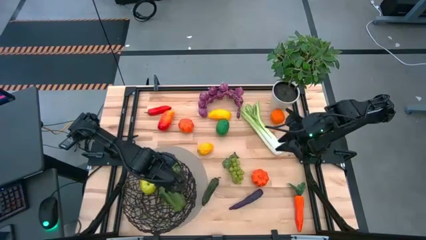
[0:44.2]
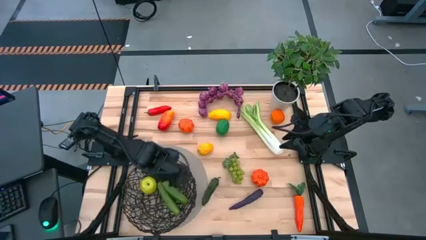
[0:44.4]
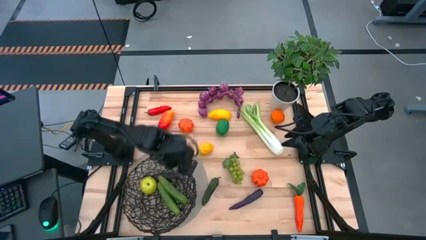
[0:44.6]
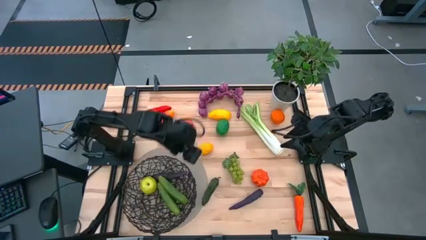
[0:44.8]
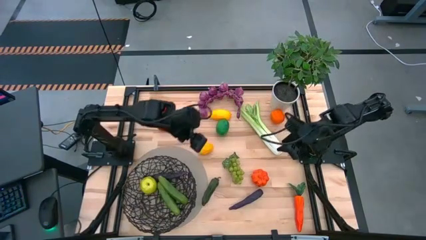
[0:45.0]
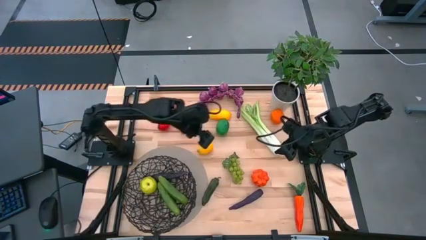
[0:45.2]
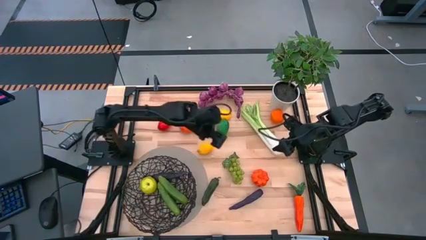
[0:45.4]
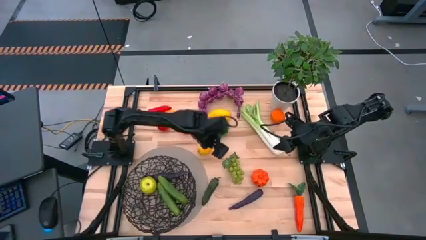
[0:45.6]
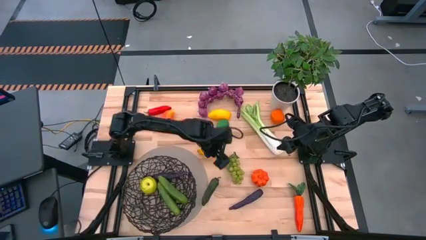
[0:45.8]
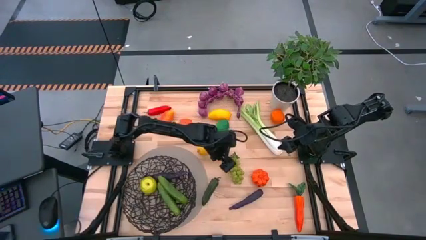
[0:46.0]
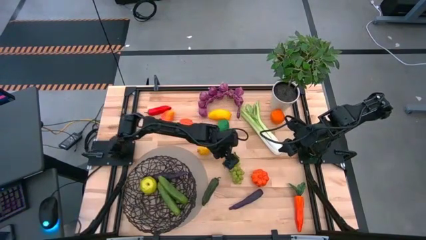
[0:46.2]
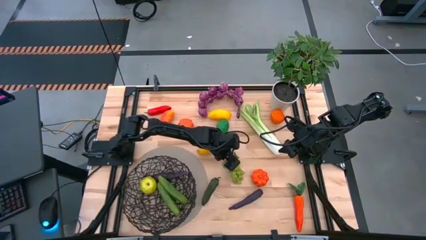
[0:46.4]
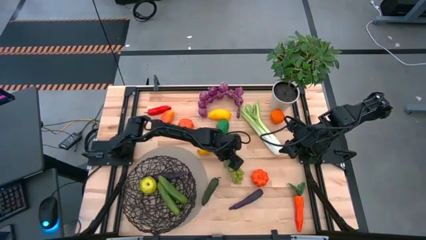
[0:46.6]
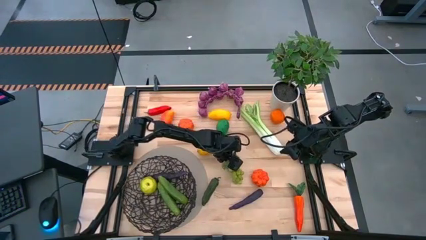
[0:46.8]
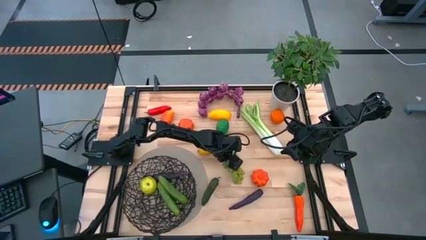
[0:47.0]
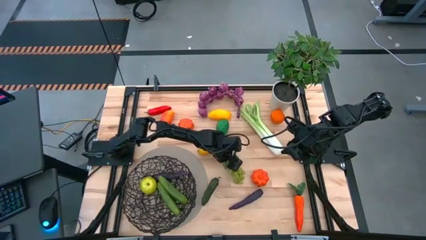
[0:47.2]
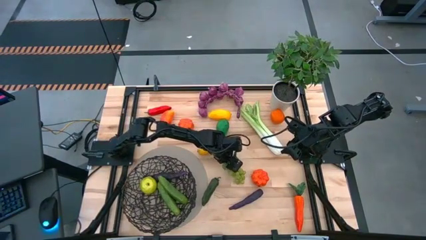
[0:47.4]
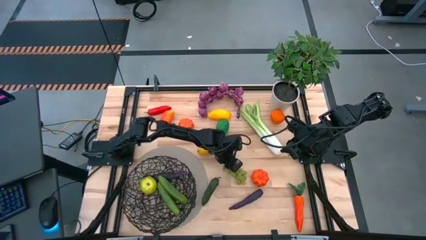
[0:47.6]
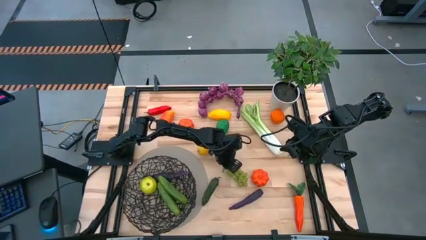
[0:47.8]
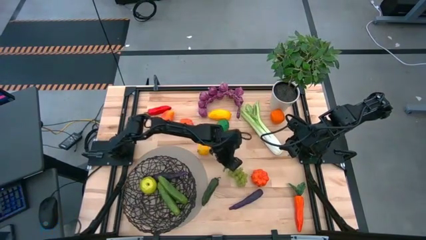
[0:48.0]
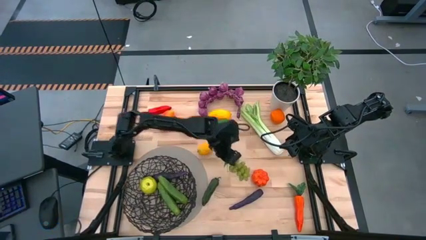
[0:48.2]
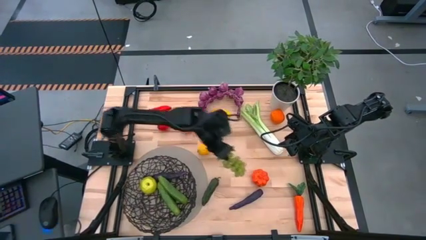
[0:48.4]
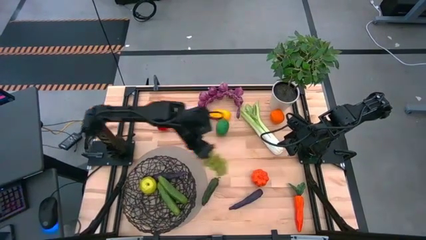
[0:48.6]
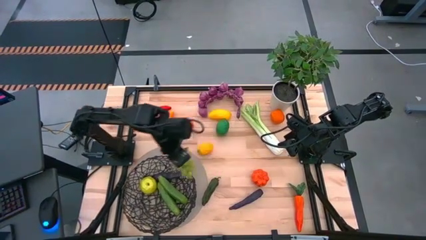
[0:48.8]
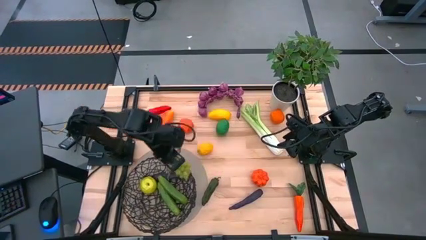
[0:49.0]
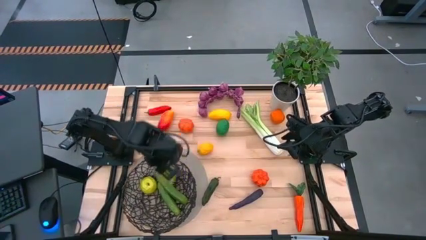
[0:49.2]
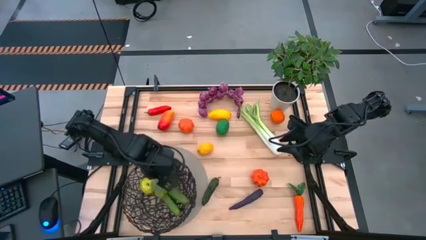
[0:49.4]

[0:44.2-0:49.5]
Task: Build produce basket
Put the green grapes into the black basket

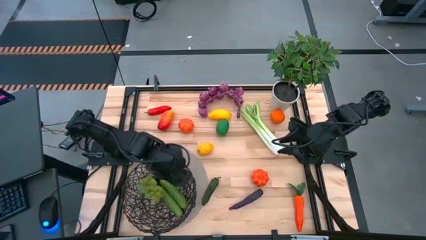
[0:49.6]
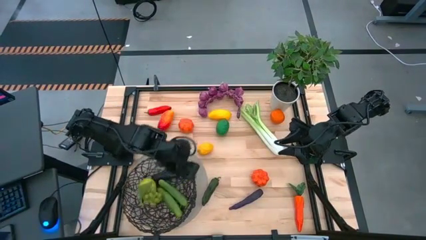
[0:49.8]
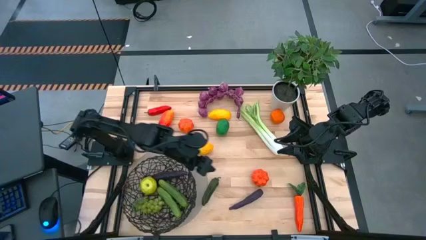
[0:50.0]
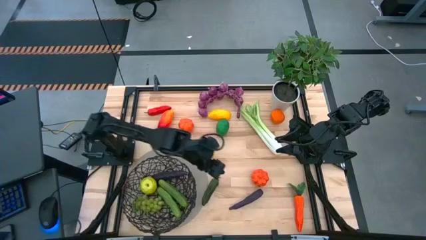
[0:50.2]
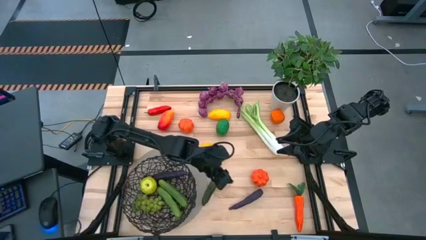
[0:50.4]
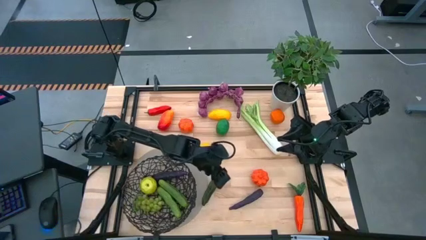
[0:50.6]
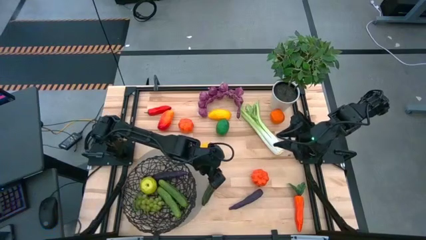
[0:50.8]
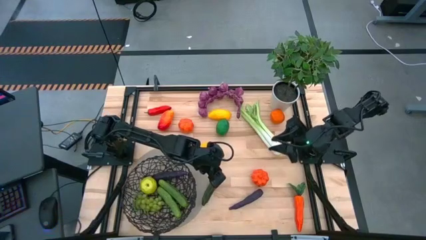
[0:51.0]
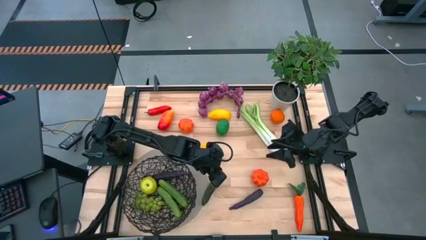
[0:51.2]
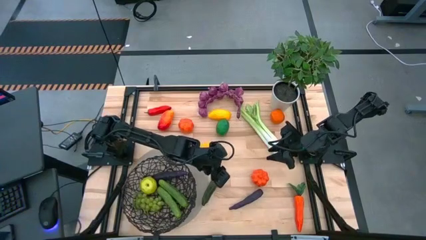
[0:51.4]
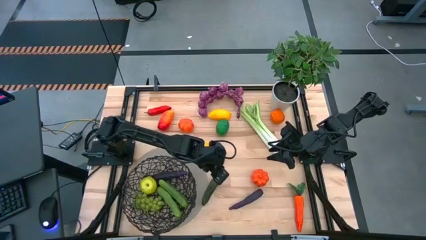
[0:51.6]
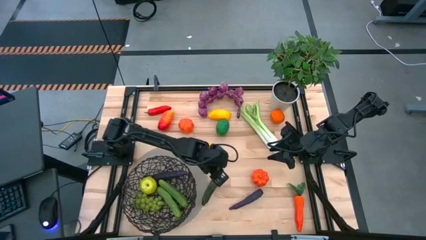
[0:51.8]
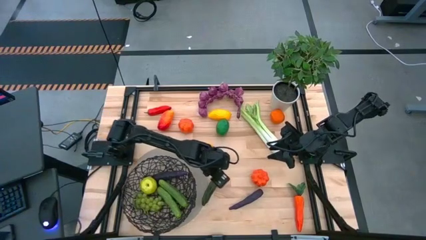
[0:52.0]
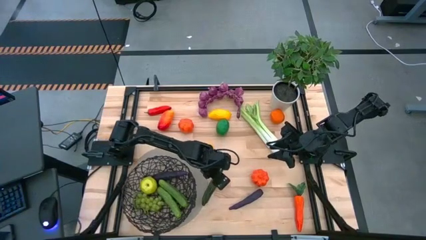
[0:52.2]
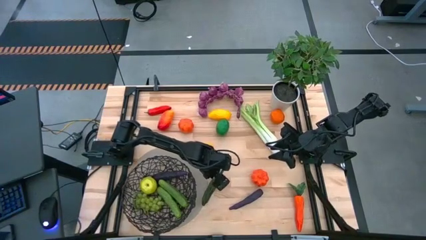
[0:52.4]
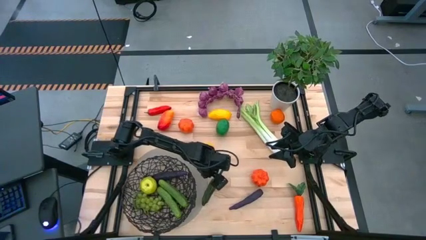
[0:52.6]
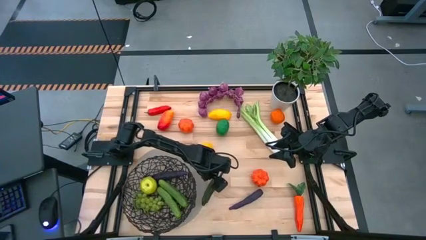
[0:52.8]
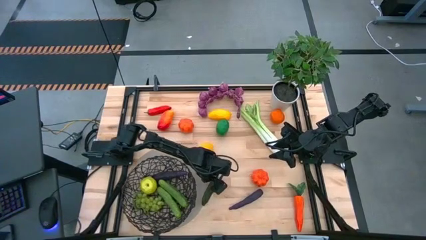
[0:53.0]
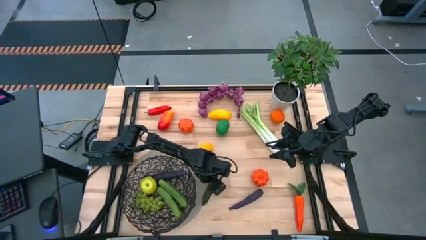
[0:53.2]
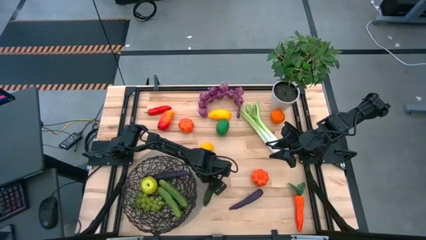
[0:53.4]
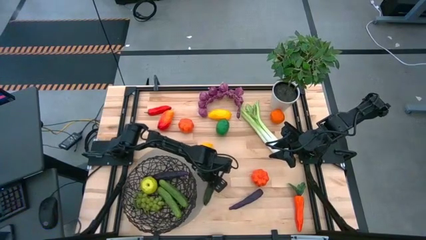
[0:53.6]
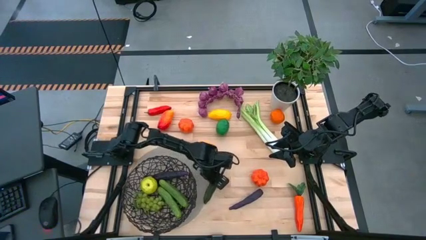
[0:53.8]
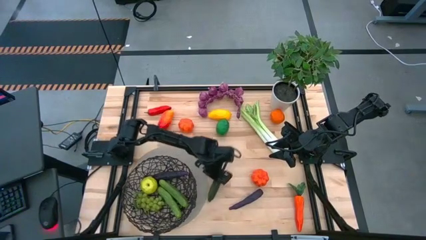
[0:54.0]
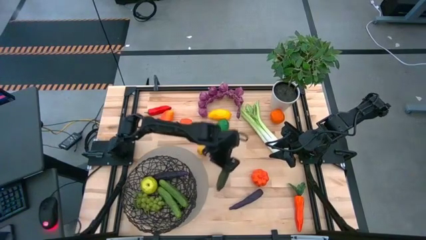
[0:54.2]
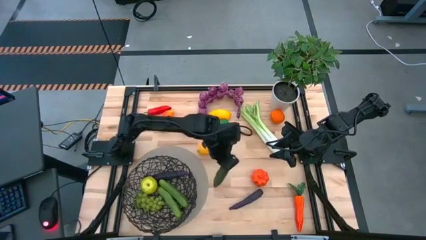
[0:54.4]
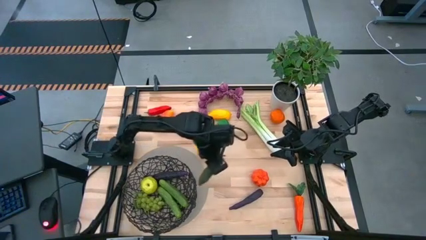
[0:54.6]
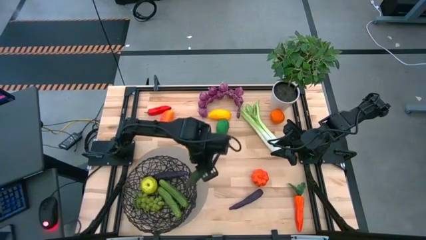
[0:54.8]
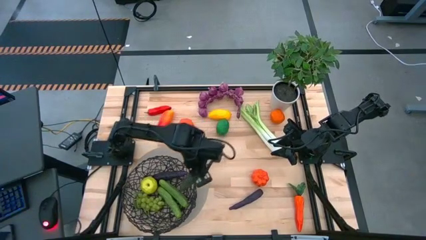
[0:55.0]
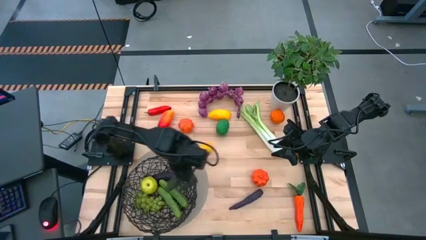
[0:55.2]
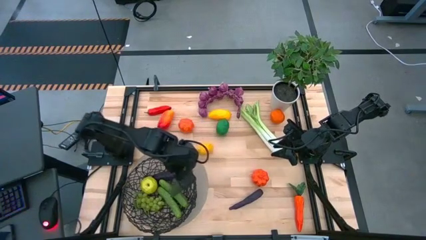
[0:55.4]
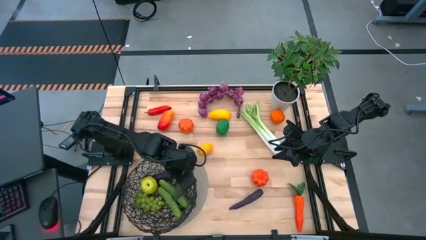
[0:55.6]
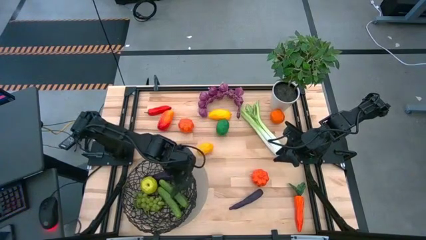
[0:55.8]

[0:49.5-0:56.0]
Put the green chili pepper into the black basket

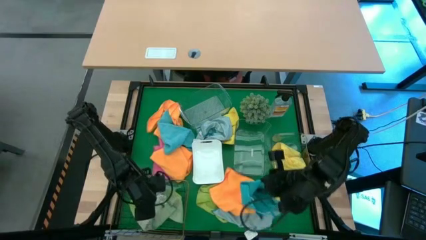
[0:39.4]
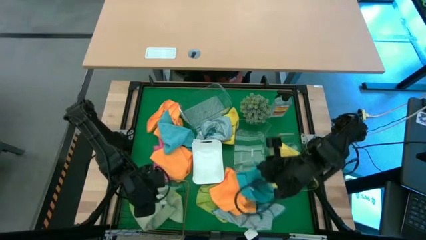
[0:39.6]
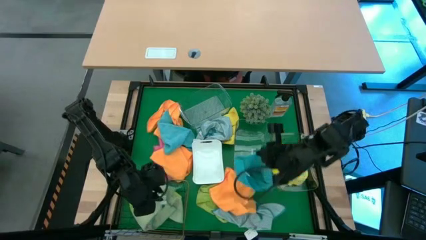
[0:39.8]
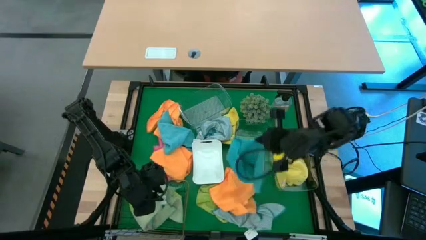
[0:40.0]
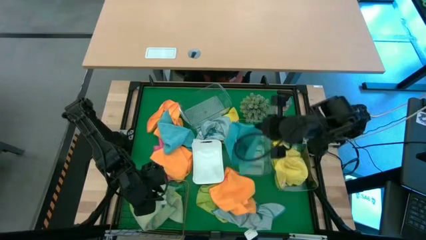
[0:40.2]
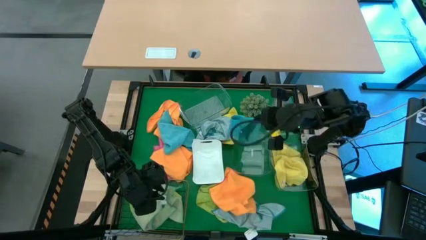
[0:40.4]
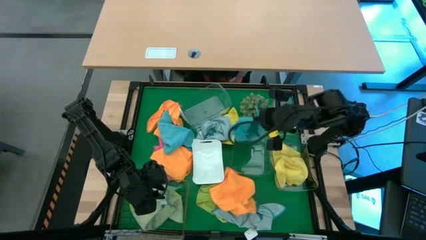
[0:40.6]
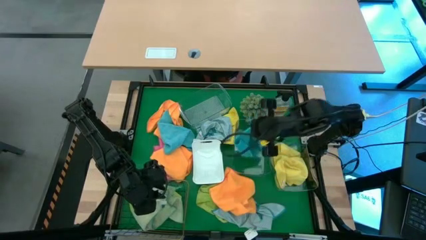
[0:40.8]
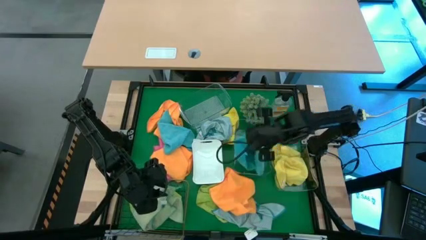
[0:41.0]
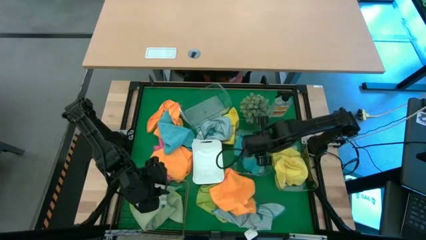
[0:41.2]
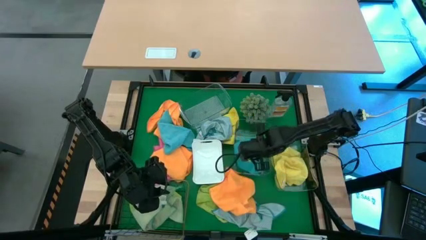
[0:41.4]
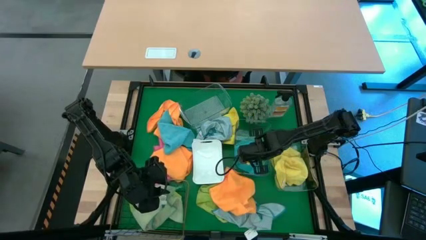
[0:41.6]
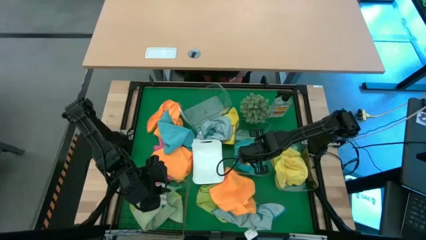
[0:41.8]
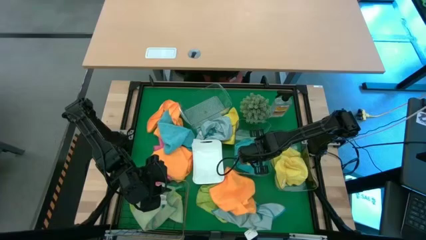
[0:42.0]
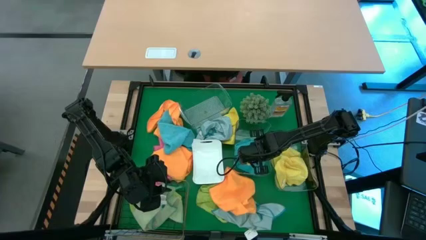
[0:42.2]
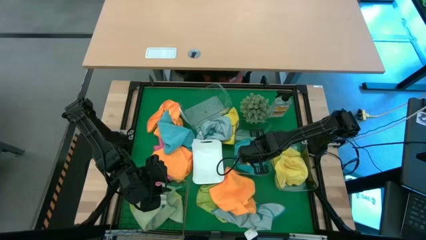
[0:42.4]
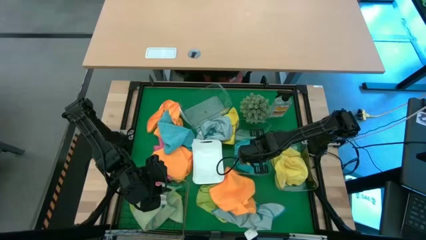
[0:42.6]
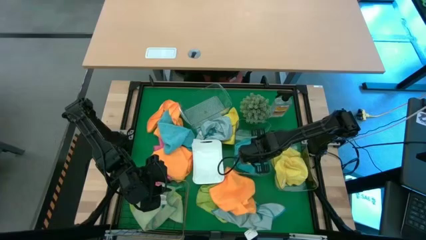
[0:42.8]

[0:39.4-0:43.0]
Task: Sort microfiber towel by color & place in baskets
Put the blue microfiber towel into the middle transparent bin
